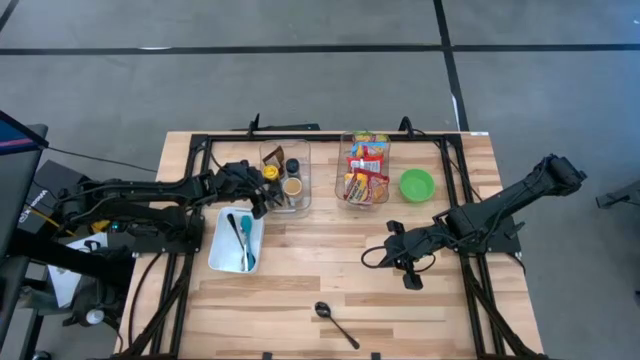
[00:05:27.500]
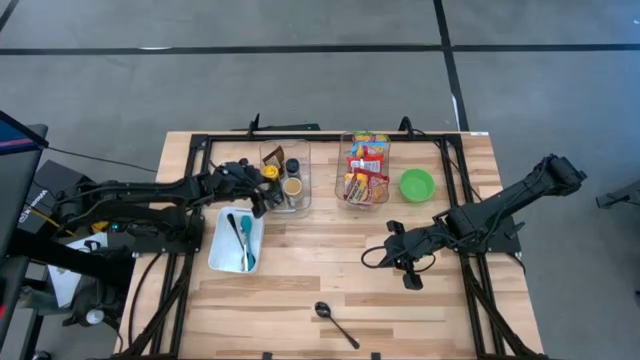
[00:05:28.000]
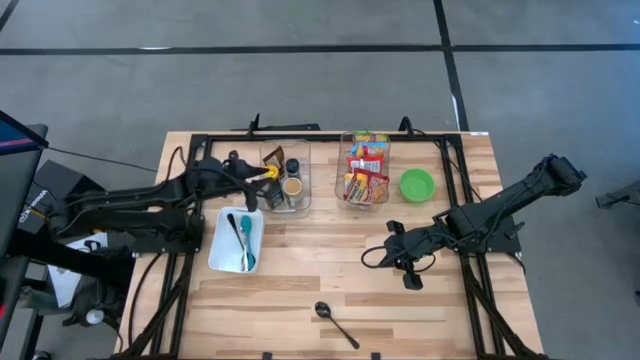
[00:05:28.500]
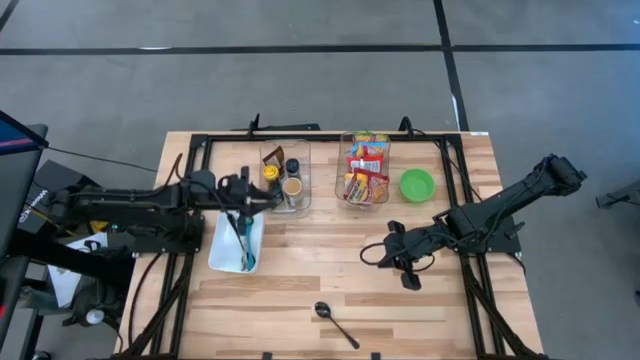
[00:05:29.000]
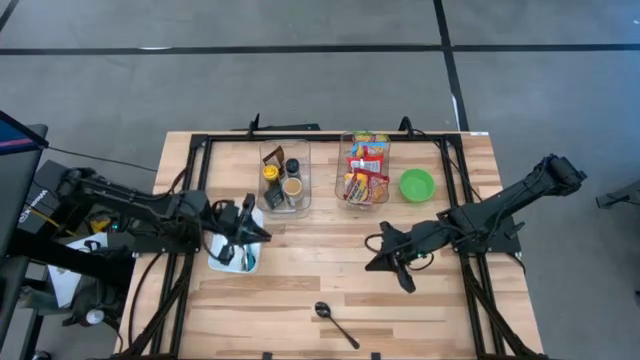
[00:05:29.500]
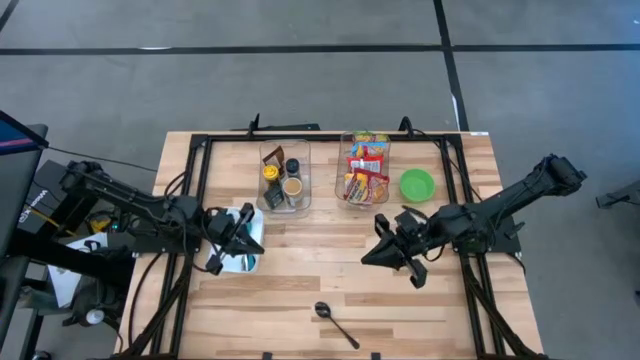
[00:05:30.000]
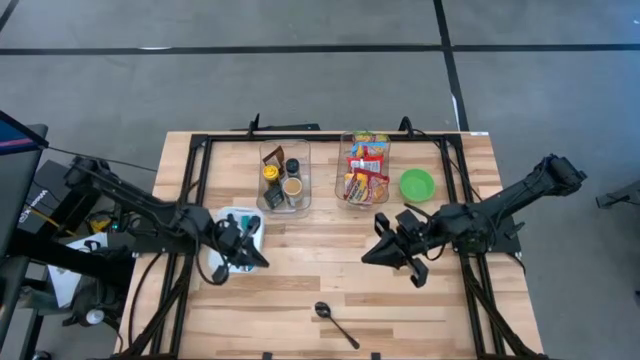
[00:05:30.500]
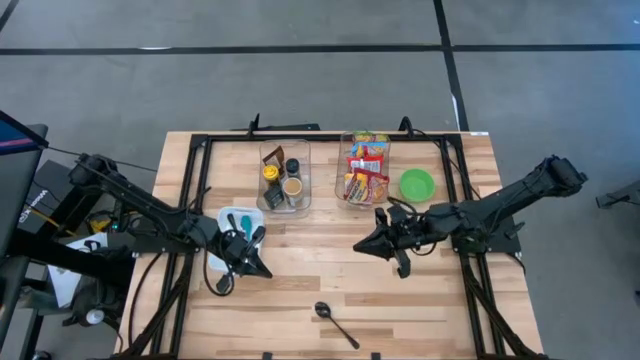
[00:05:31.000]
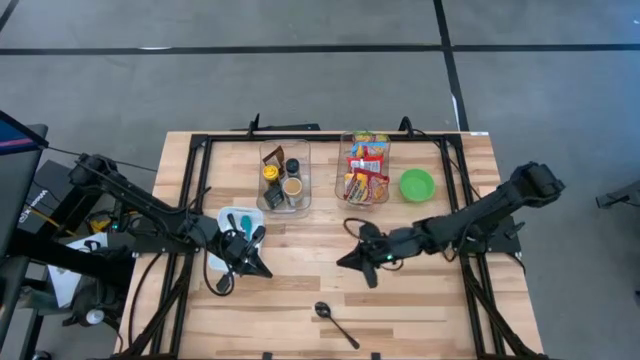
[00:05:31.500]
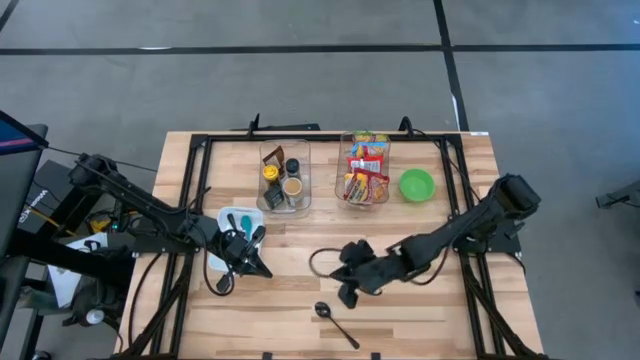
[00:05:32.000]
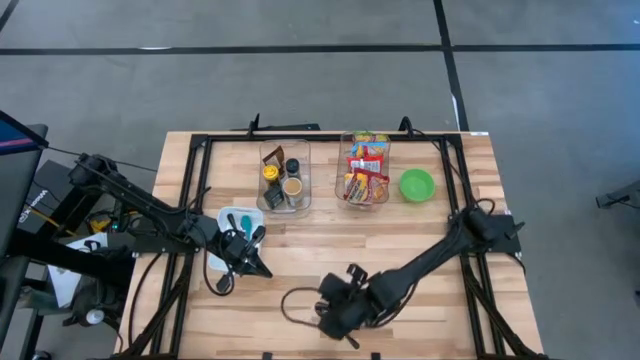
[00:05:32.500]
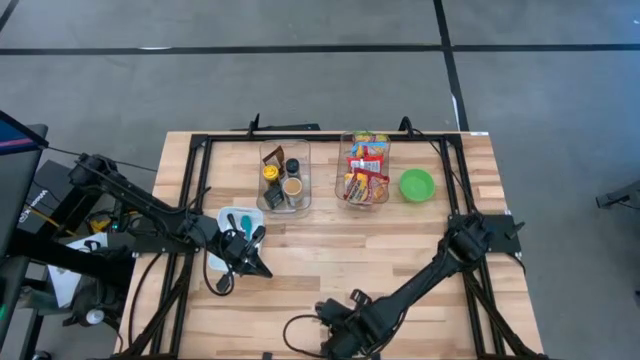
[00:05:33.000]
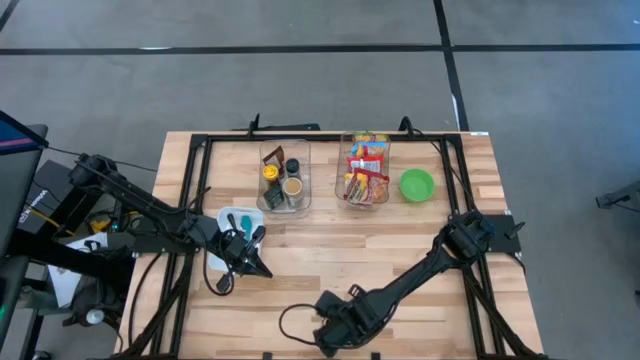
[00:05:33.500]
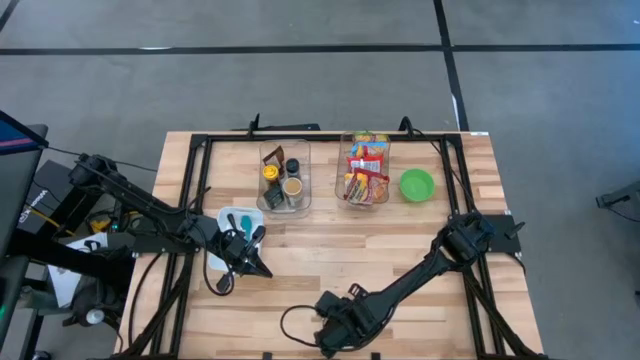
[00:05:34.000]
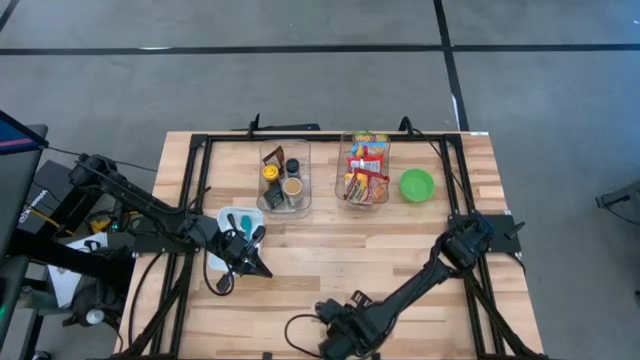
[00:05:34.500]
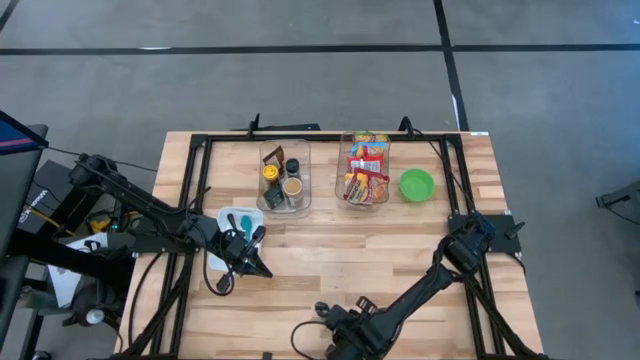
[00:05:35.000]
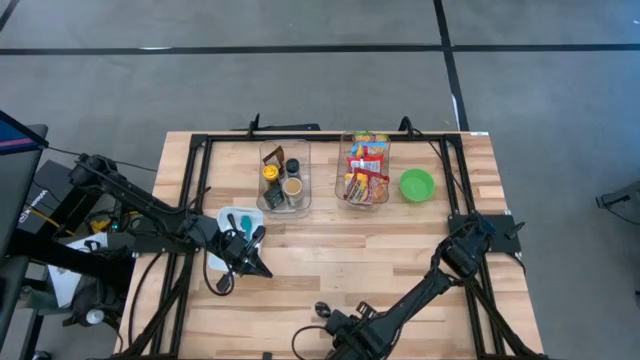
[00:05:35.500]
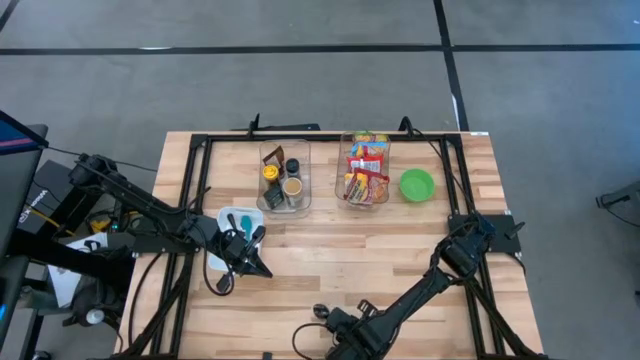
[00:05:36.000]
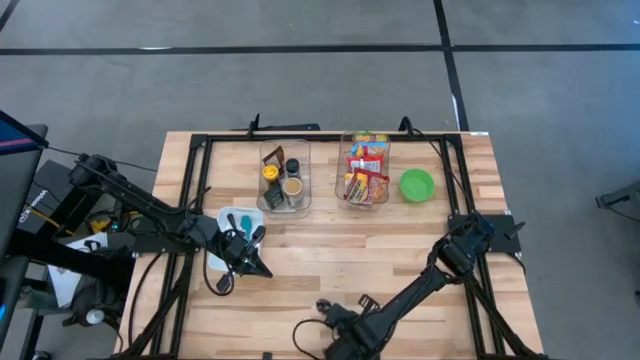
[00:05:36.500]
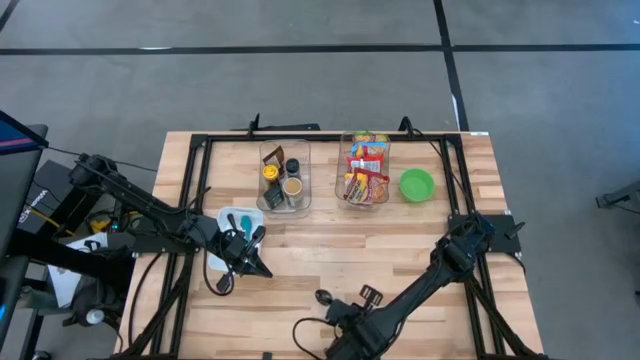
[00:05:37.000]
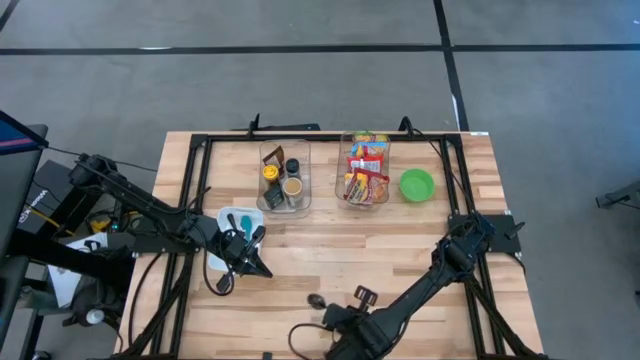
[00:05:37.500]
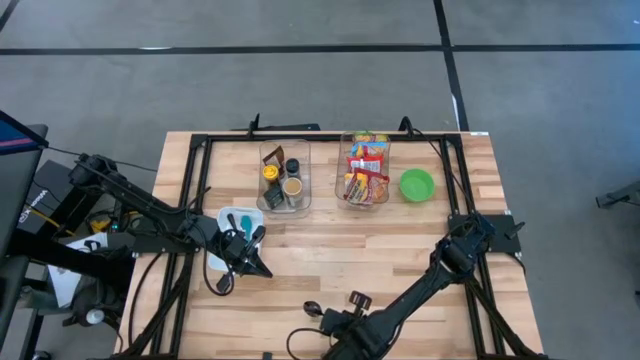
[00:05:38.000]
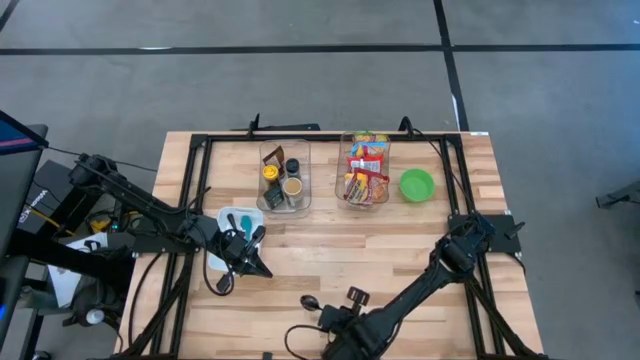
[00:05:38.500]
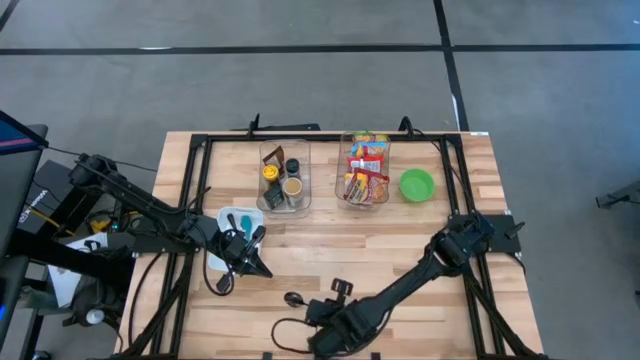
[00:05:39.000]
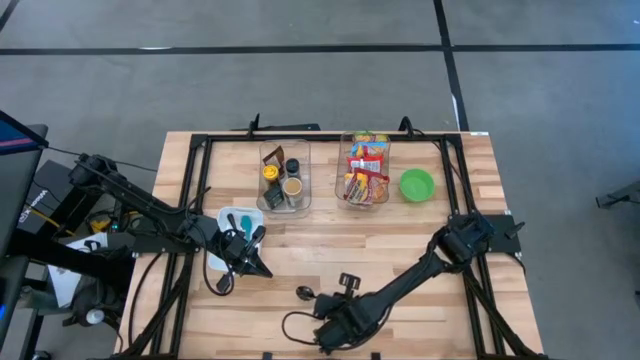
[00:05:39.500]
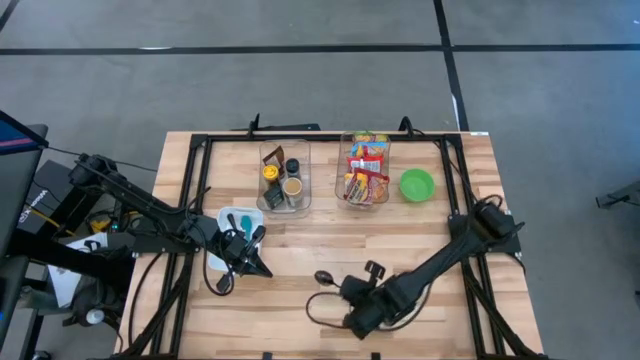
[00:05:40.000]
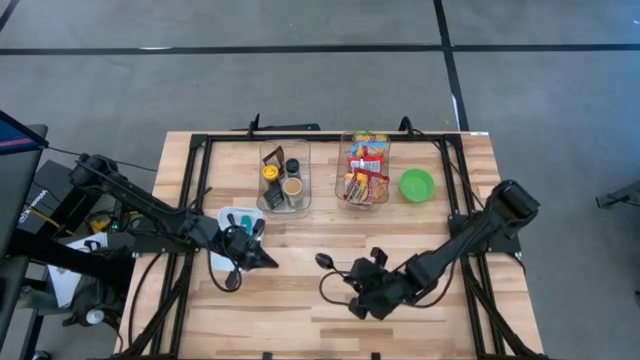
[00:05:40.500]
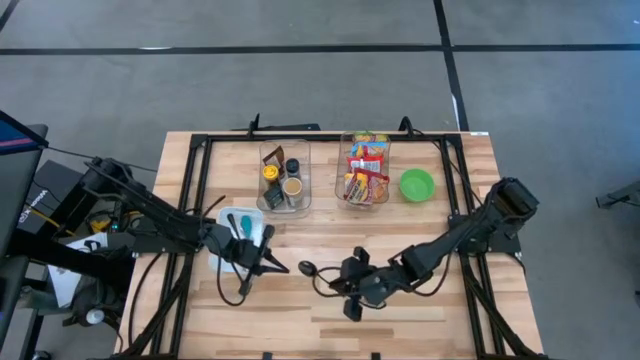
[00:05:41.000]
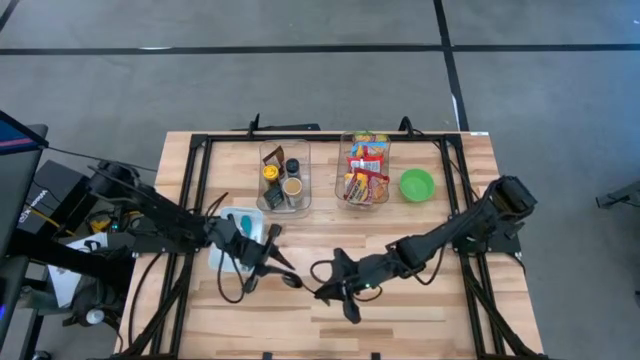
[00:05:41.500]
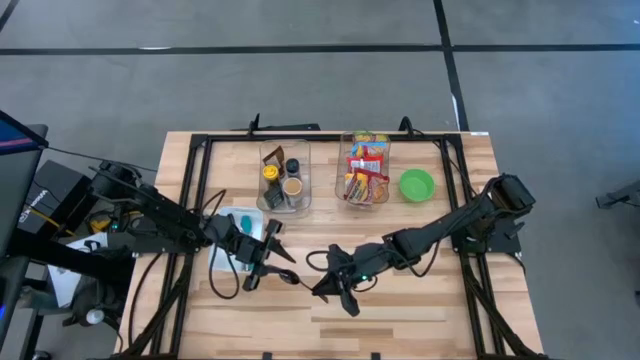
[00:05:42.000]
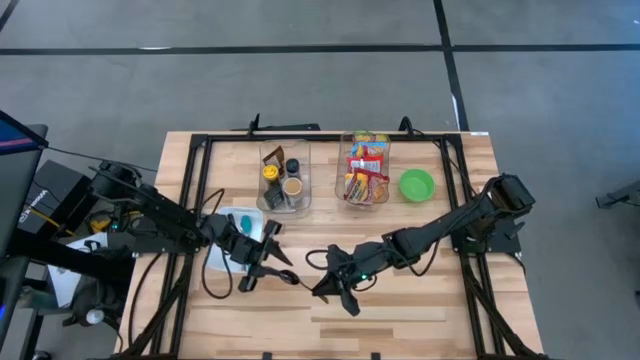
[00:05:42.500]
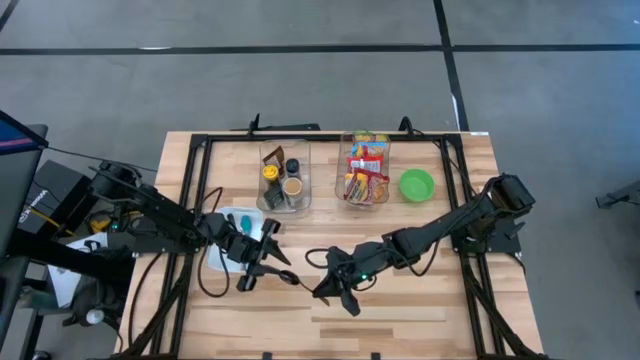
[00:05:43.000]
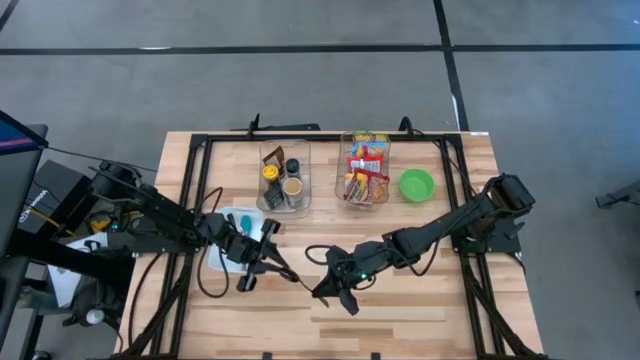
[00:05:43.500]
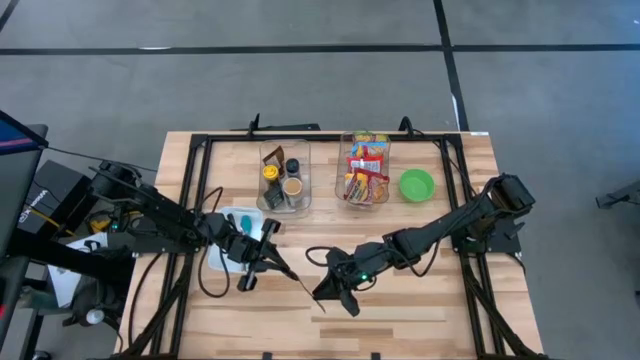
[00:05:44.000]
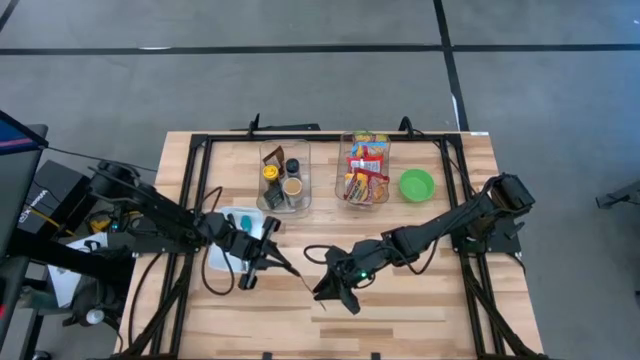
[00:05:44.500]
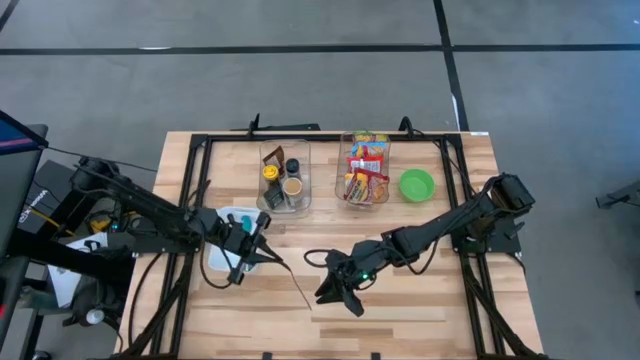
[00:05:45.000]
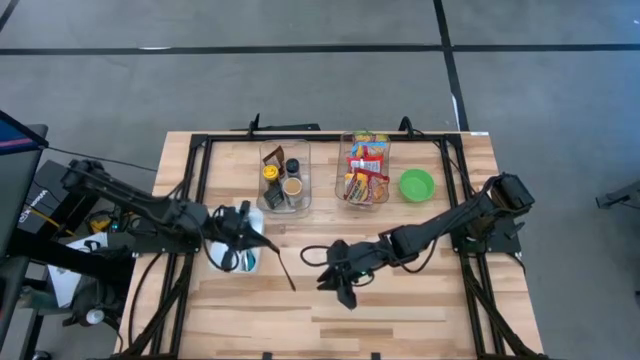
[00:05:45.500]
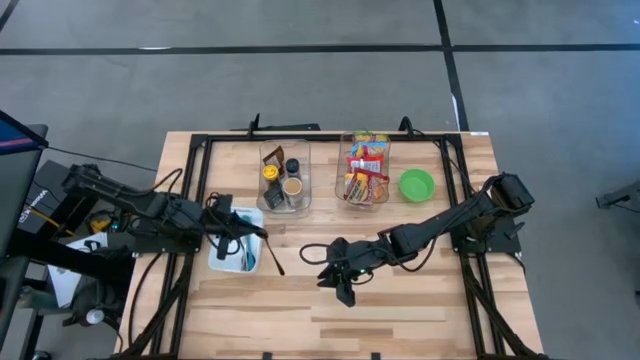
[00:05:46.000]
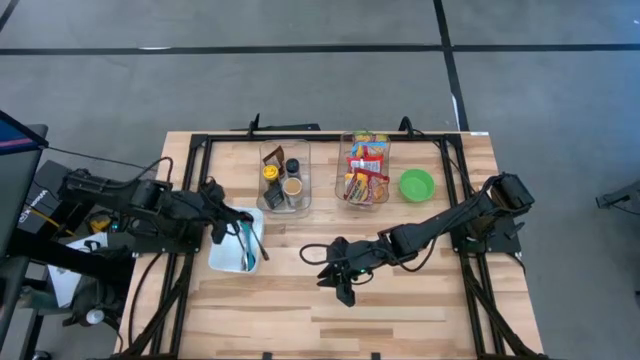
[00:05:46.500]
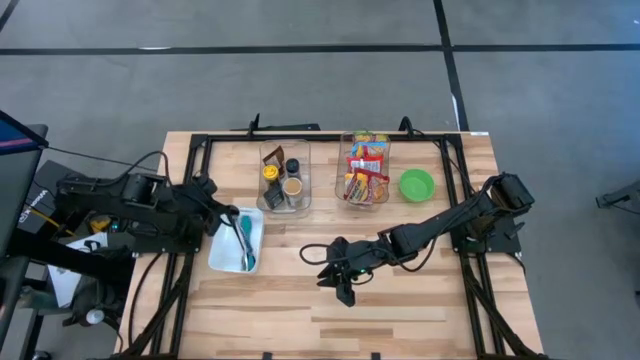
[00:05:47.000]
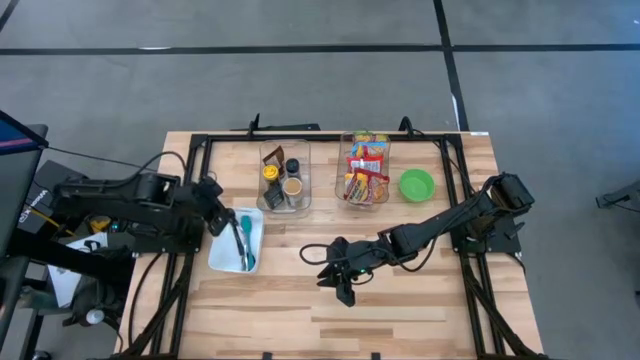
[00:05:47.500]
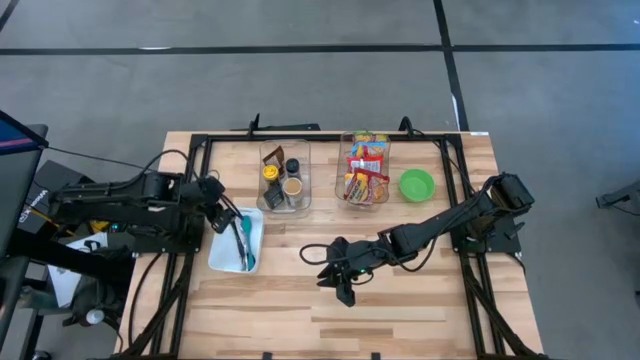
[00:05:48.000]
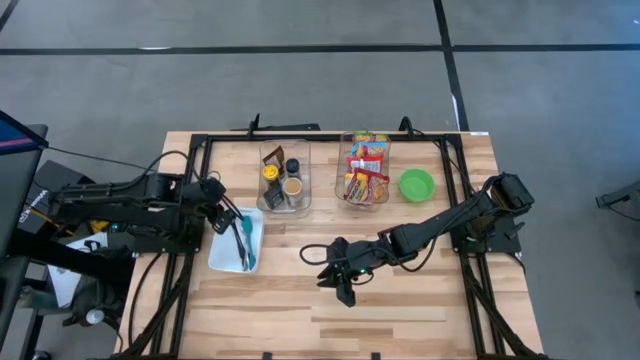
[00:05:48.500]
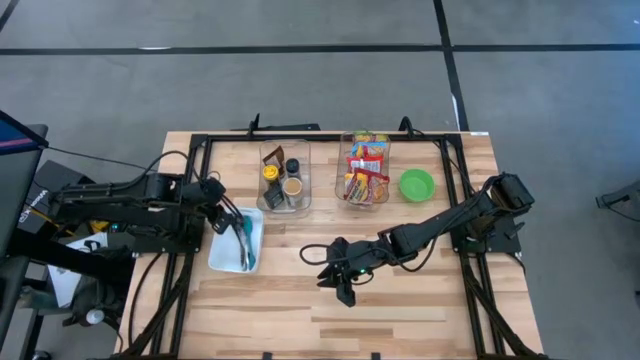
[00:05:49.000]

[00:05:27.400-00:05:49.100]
Task: Pick & Place Food Item
Put the black spoon into the white bin
